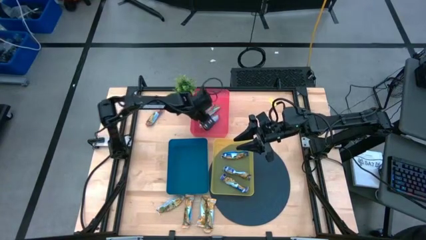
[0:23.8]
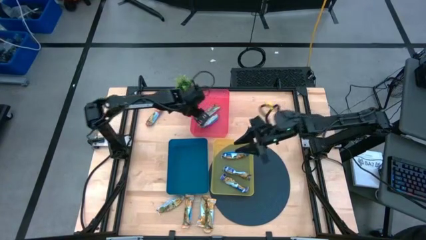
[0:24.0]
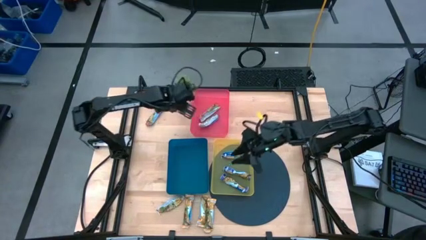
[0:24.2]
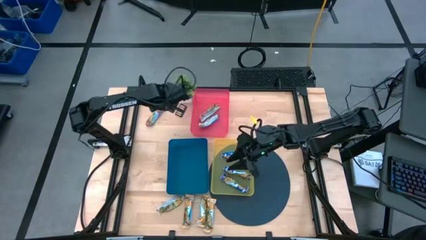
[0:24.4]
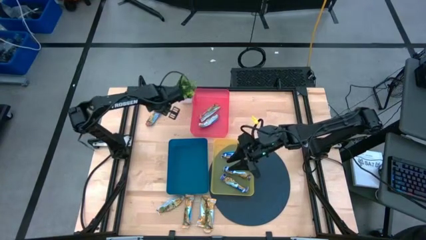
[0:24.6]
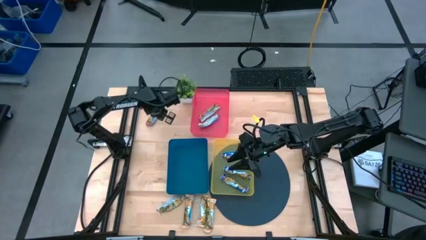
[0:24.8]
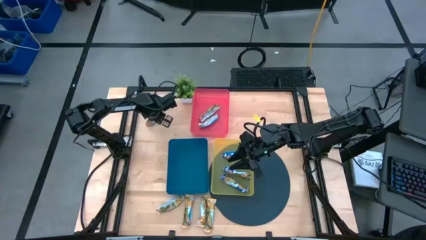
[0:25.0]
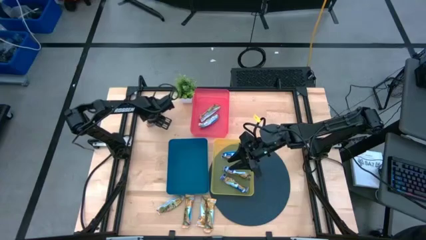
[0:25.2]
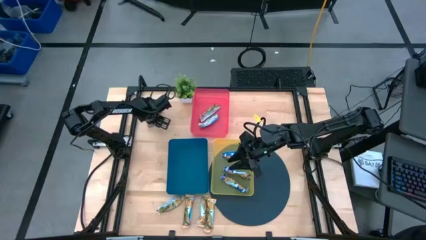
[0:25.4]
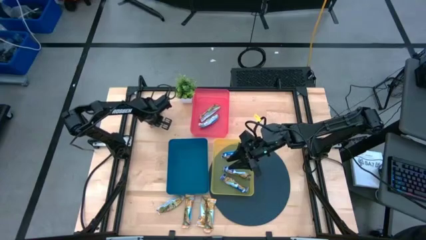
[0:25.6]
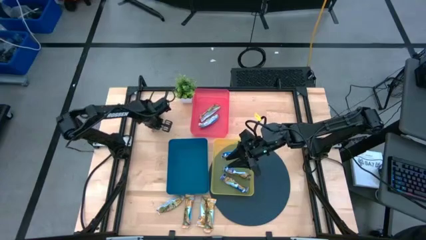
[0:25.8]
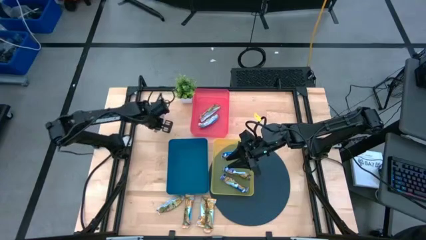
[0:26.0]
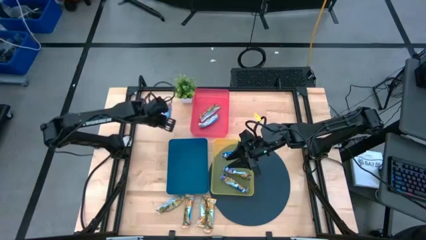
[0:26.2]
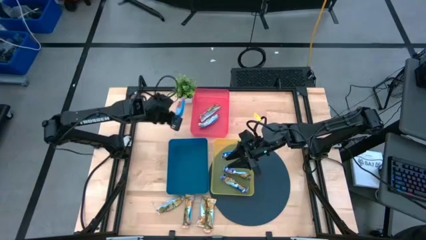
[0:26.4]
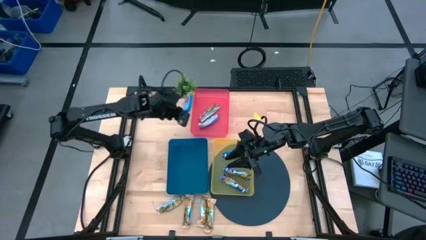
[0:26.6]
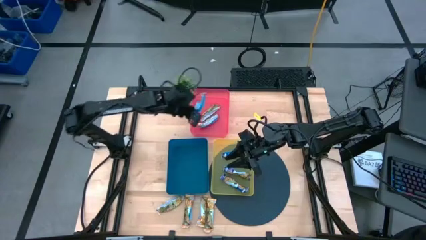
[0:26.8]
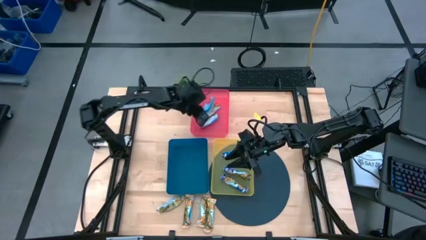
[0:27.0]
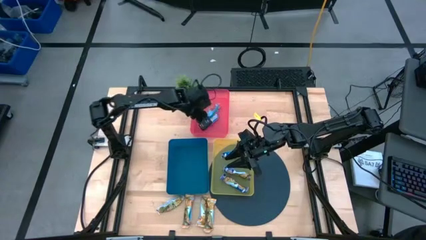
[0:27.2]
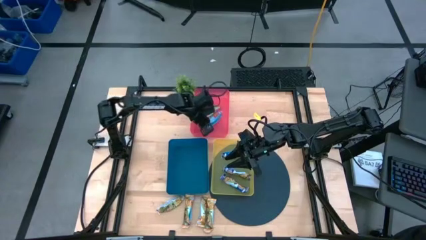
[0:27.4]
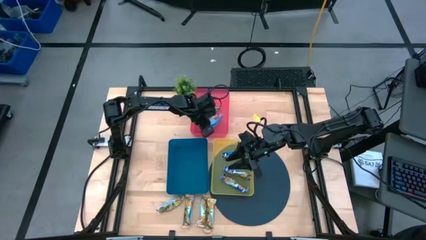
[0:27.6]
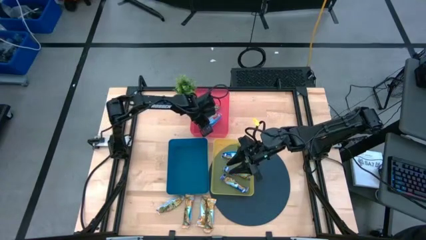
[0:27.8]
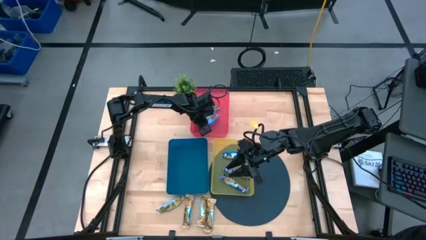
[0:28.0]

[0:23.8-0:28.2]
Task: Pick and place Granola Bars by type
Put the red granola bar into the red bin

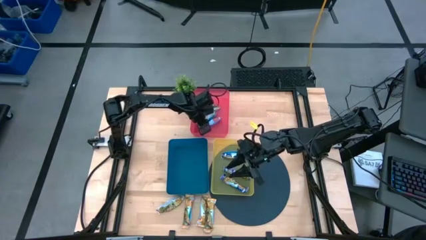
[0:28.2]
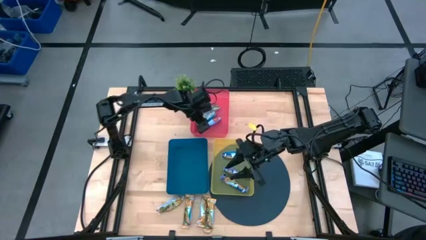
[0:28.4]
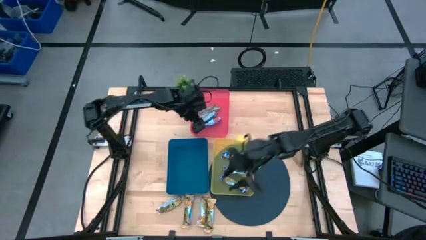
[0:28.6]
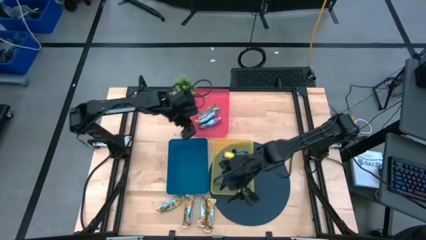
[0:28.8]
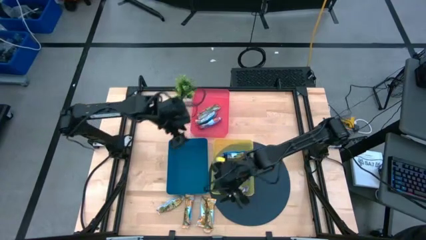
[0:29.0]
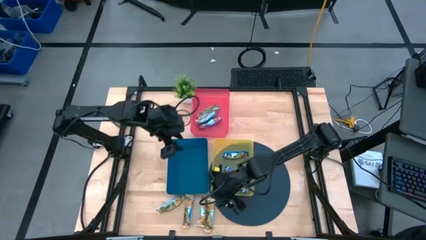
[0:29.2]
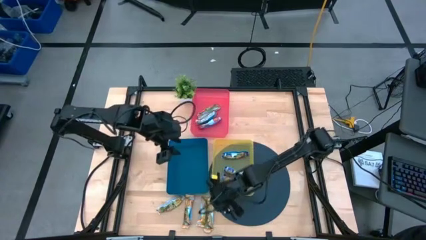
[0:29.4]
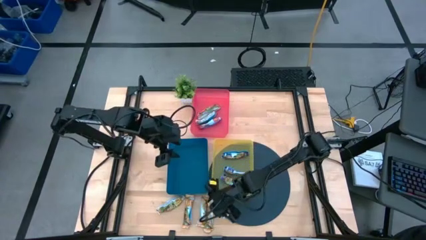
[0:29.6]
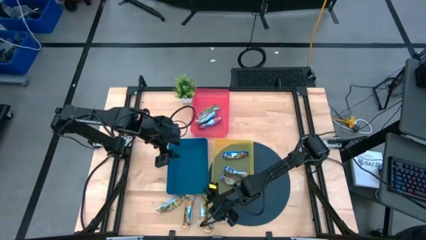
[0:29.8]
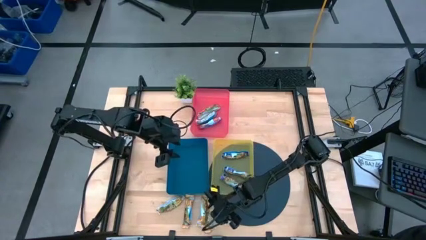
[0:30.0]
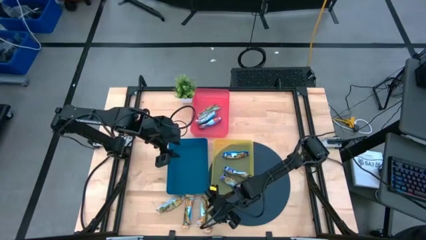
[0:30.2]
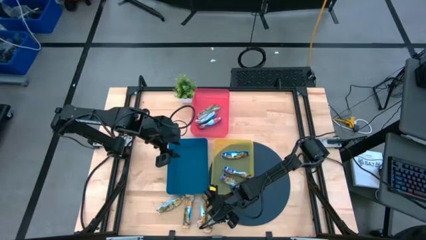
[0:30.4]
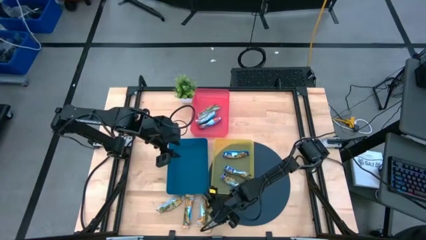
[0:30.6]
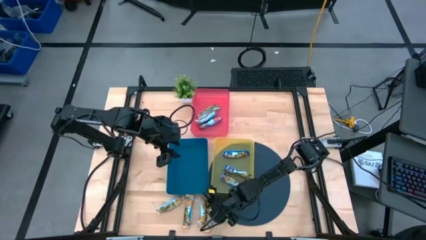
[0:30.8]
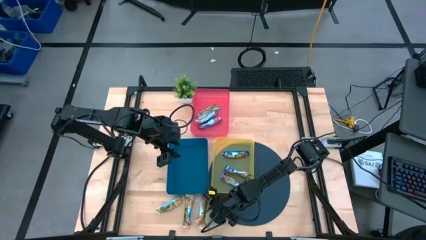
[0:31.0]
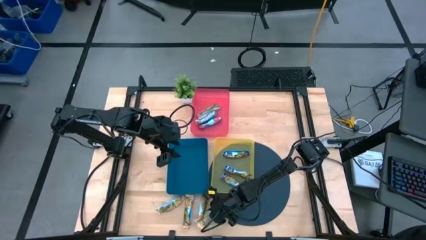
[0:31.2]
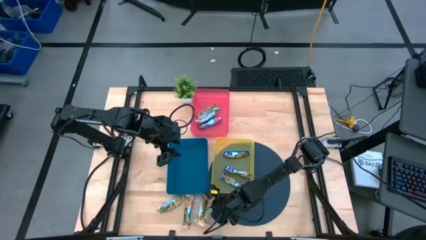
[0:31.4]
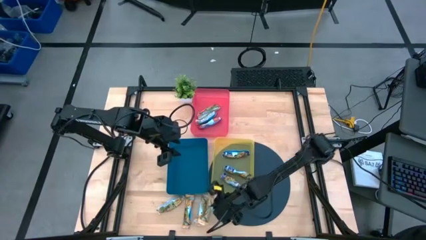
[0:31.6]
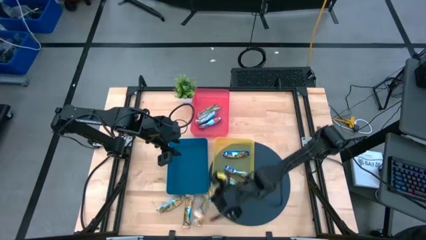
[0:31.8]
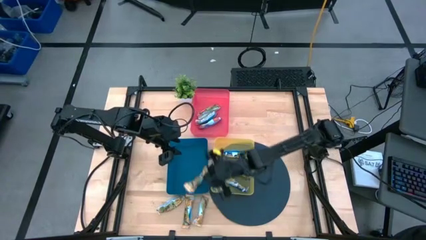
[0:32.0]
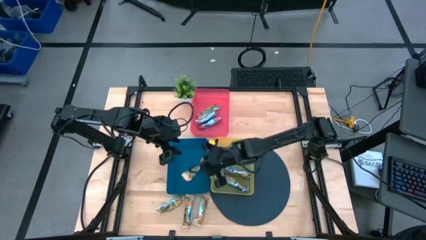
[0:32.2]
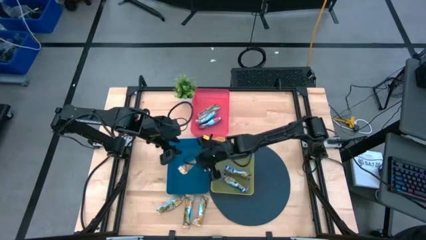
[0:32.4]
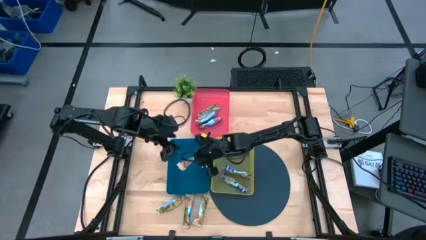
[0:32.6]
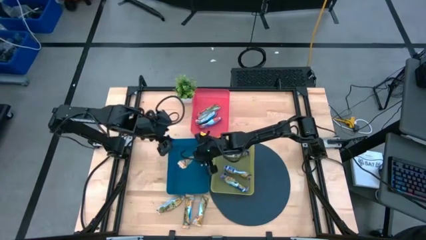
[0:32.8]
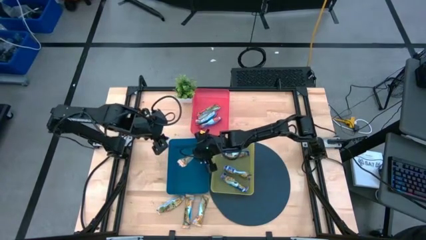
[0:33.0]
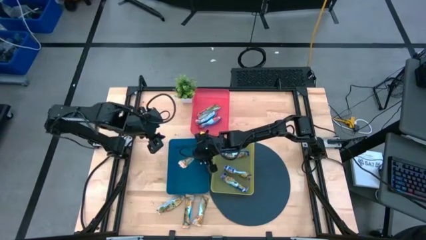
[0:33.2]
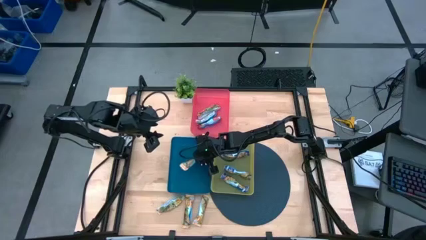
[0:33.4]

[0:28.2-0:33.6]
Put the yellow granola bar into the blue bin

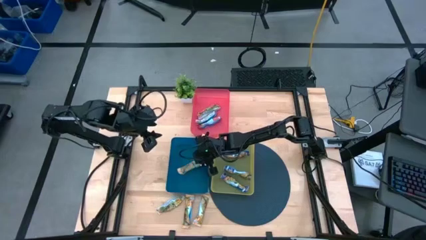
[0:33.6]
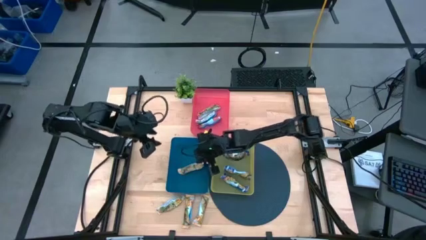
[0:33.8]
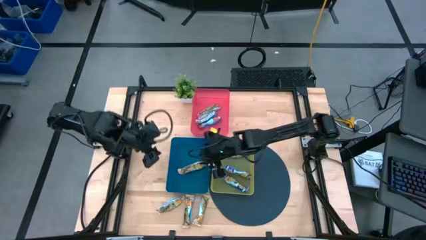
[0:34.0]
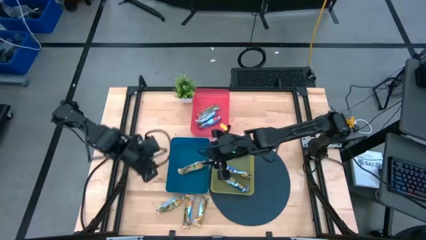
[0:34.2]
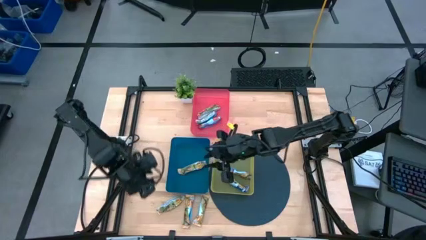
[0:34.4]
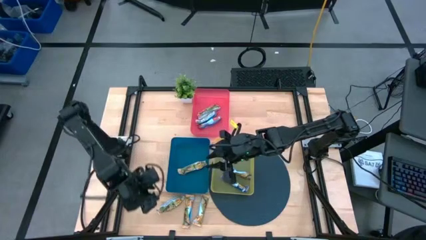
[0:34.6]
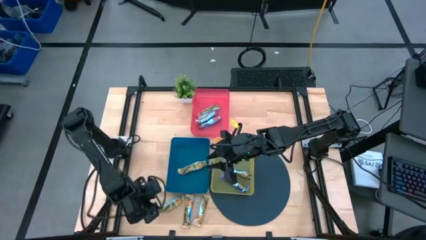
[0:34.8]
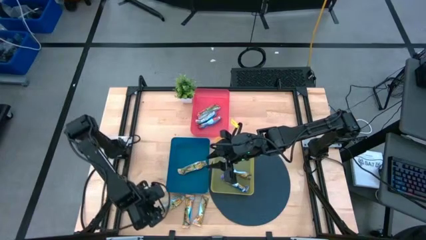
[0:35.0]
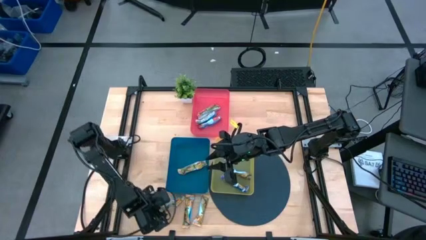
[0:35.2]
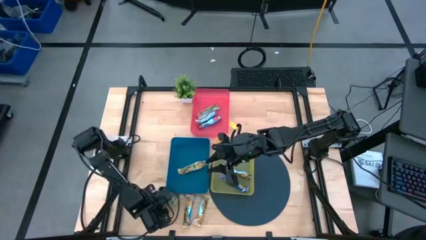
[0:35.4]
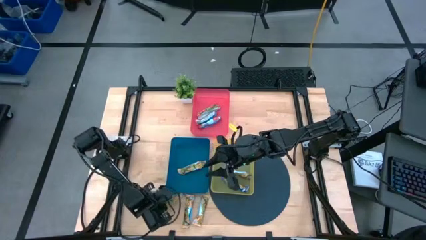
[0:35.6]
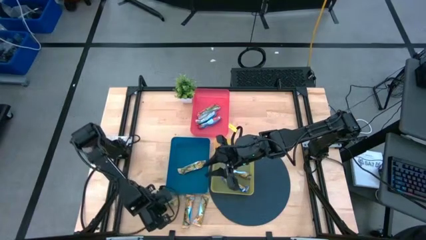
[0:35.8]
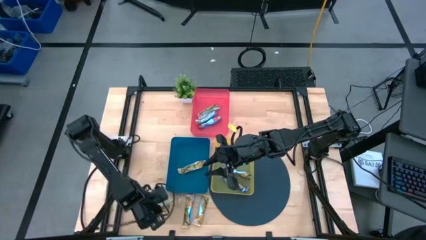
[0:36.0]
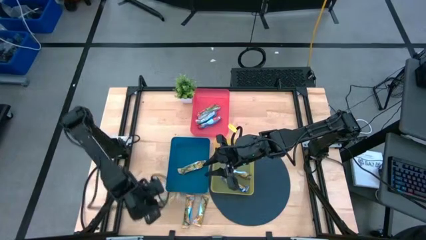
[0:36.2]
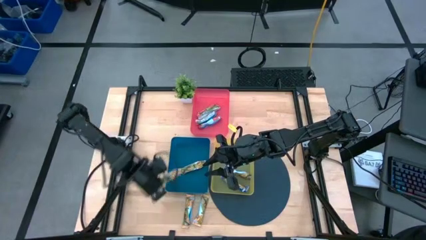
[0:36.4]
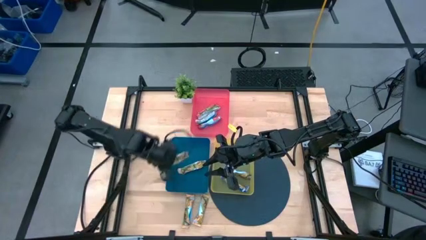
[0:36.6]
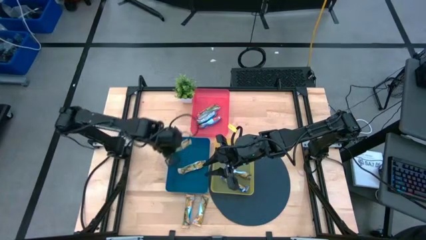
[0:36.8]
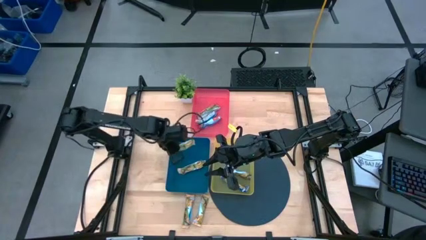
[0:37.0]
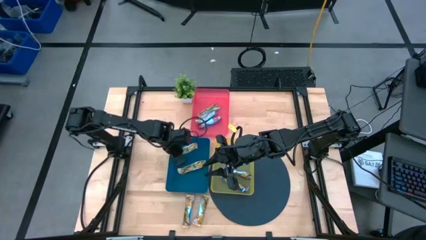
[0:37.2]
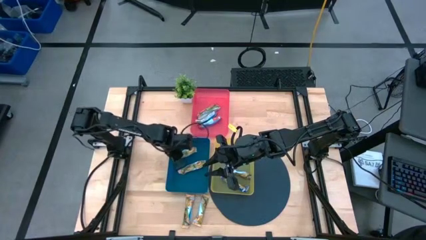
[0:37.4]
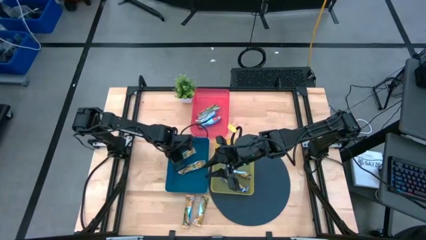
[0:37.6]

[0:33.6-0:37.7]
Put the yellow granola bar into the blue bin

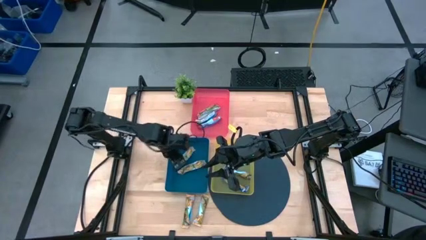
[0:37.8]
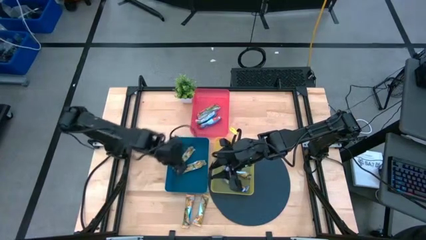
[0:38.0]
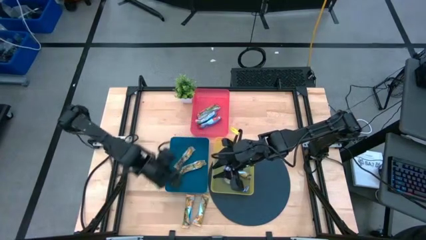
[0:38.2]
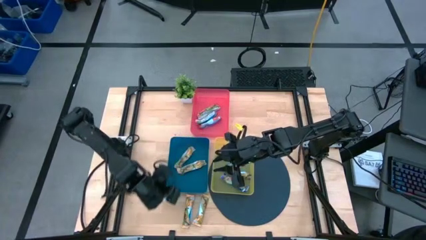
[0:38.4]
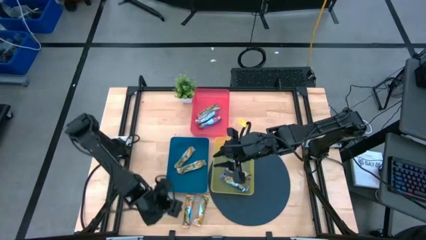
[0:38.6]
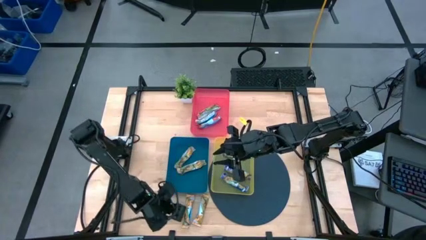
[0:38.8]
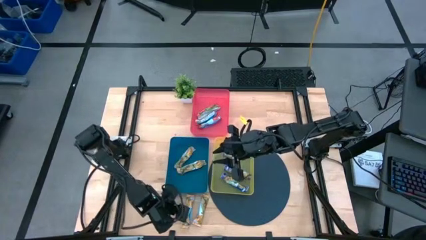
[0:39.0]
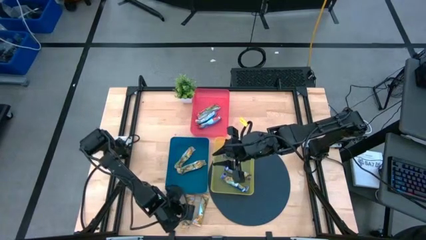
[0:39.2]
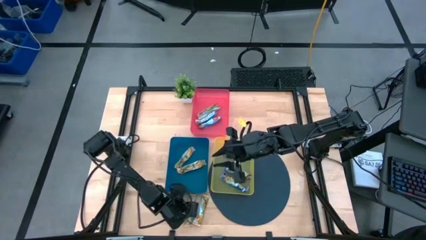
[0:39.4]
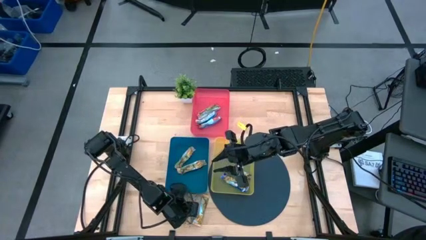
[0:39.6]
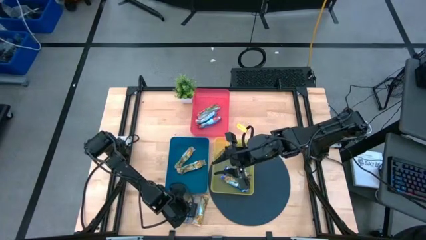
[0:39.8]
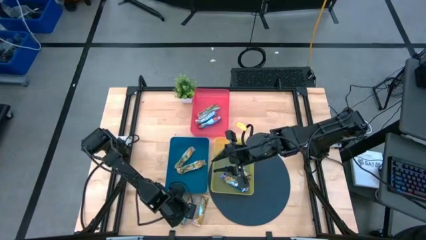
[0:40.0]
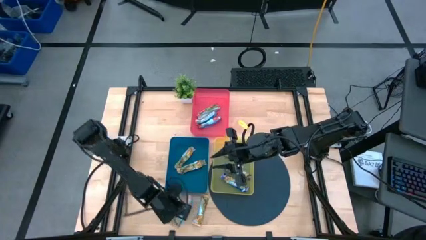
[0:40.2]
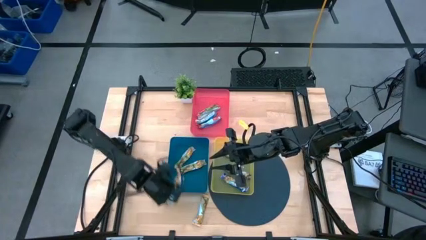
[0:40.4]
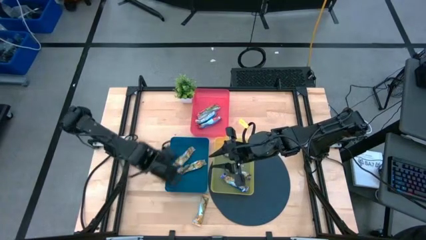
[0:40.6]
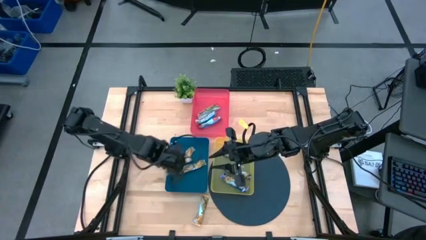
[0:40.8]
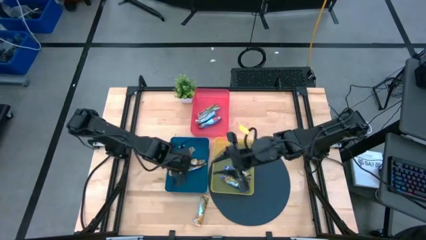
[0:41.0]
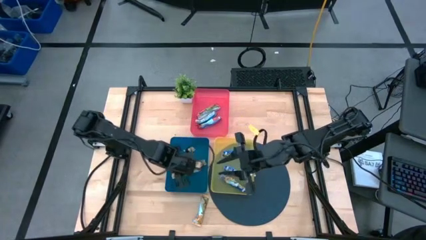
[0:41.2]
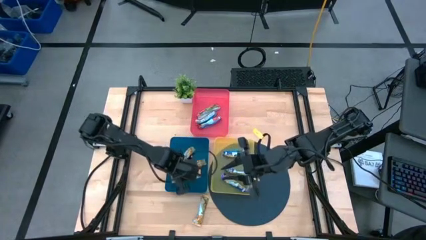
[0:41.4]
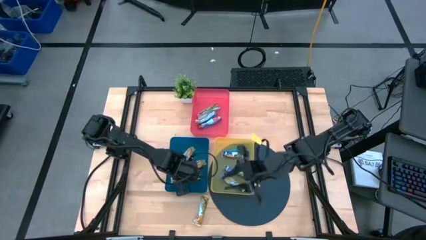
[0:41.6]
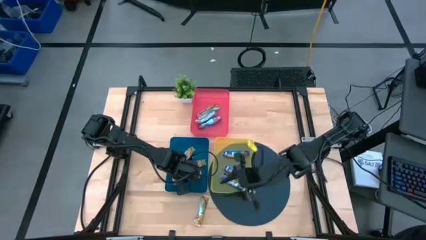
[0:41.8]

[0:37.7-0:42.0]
Put the yellow granola bar into the blue bin
